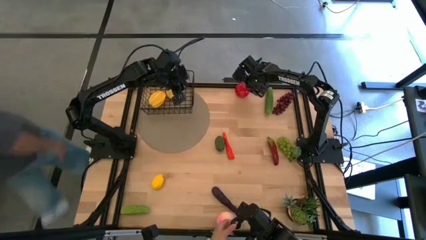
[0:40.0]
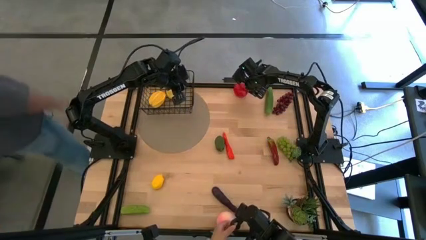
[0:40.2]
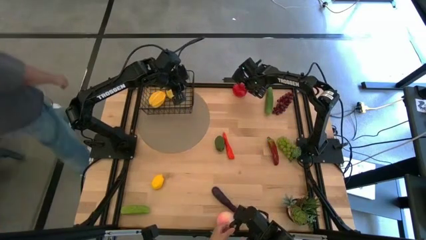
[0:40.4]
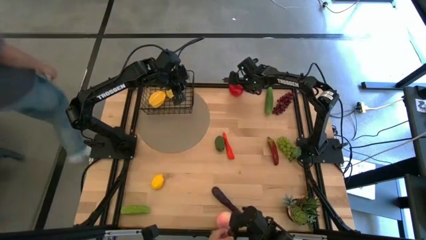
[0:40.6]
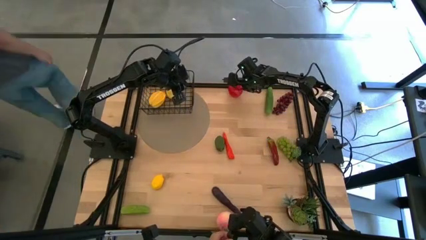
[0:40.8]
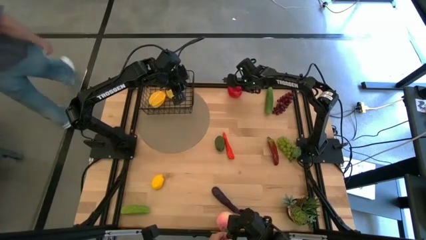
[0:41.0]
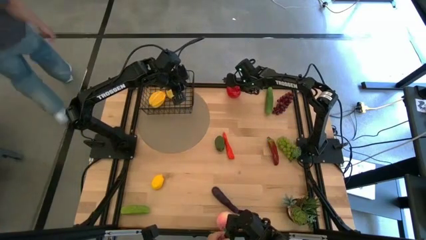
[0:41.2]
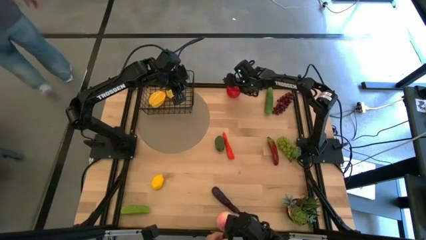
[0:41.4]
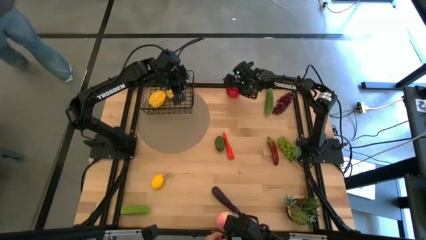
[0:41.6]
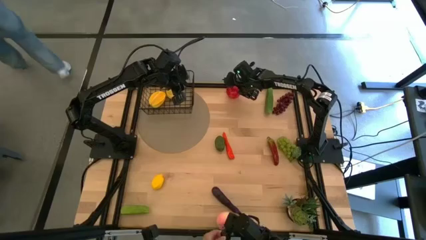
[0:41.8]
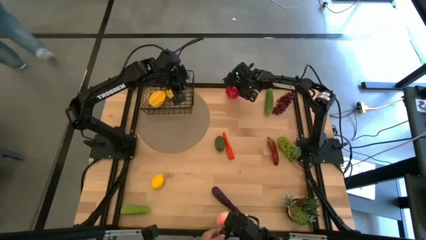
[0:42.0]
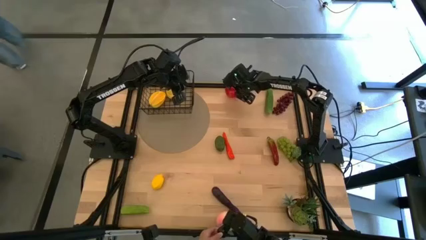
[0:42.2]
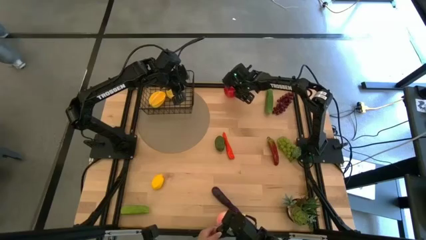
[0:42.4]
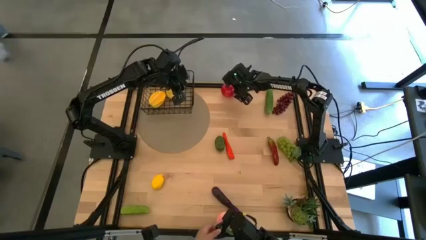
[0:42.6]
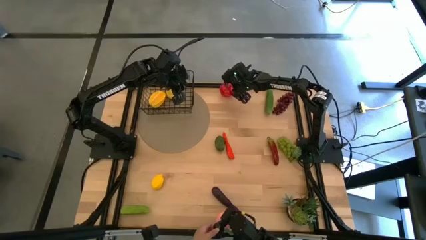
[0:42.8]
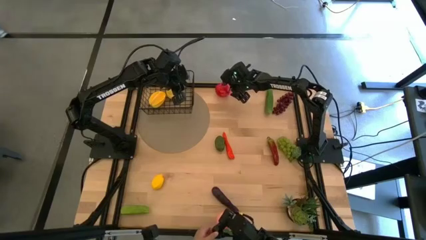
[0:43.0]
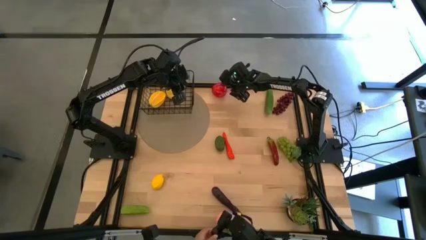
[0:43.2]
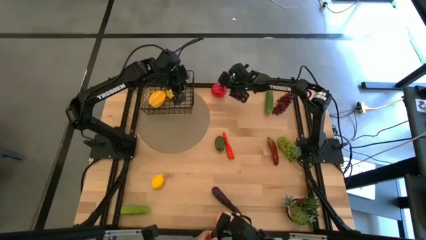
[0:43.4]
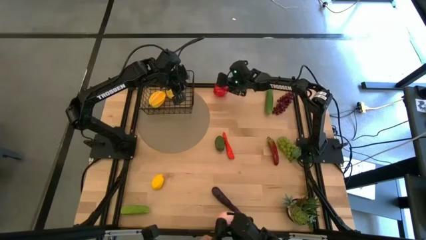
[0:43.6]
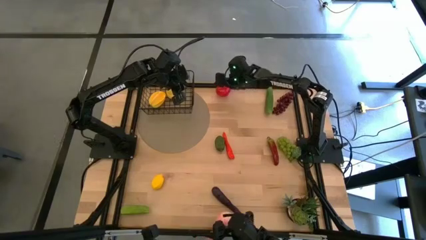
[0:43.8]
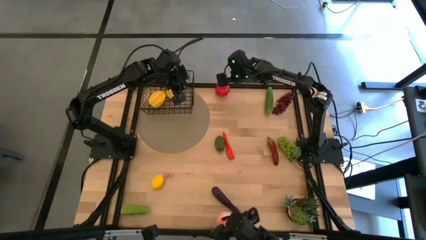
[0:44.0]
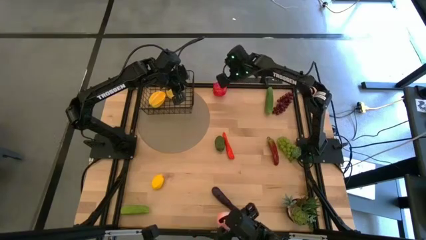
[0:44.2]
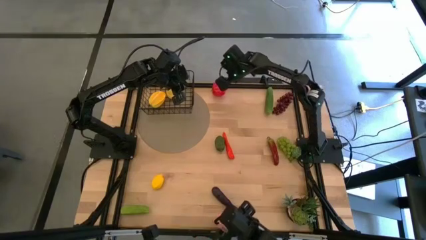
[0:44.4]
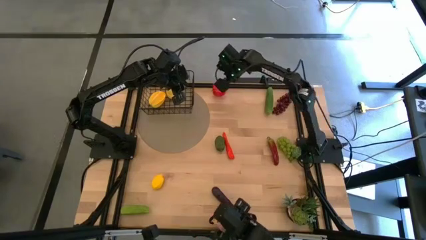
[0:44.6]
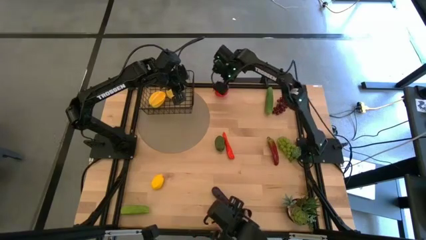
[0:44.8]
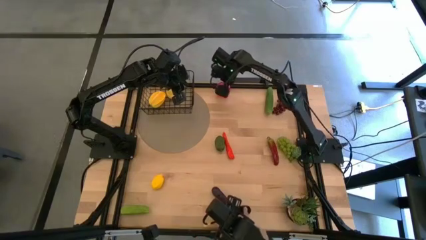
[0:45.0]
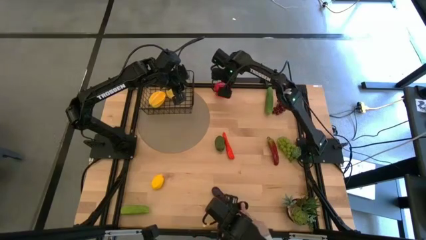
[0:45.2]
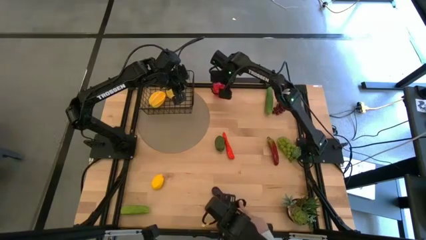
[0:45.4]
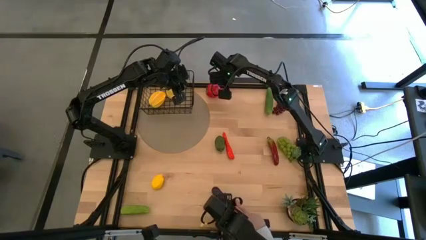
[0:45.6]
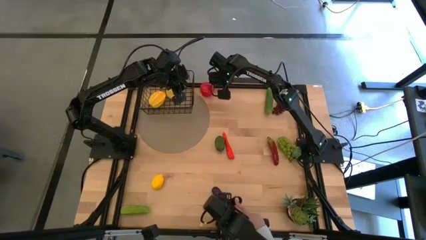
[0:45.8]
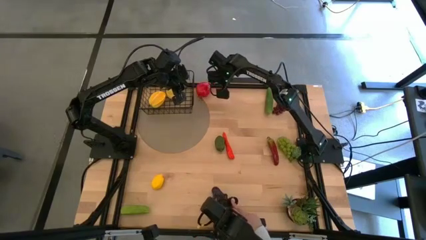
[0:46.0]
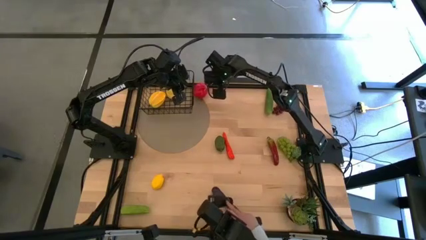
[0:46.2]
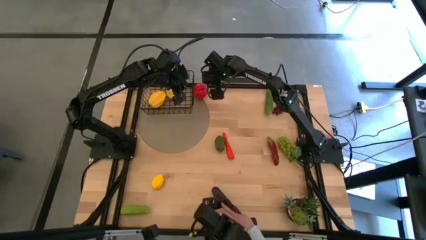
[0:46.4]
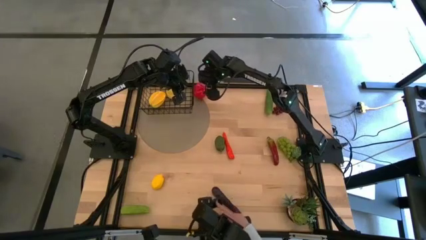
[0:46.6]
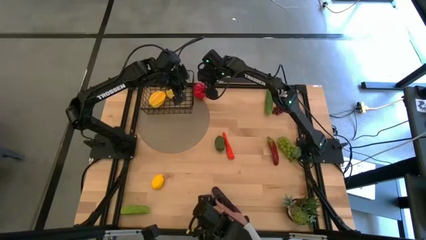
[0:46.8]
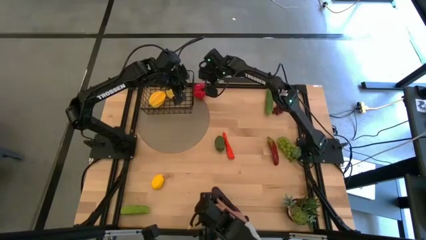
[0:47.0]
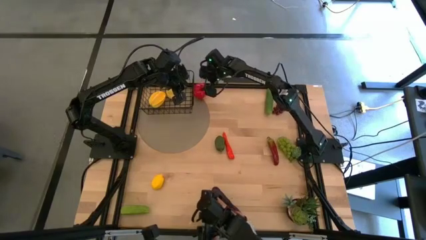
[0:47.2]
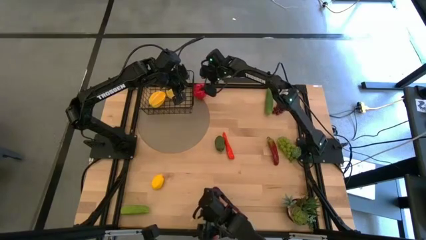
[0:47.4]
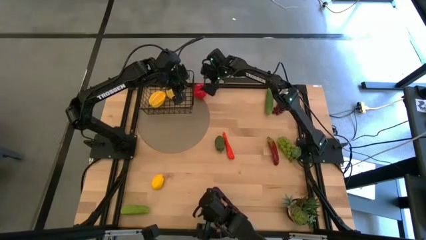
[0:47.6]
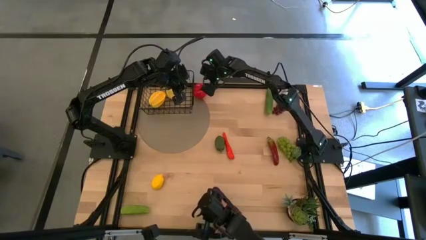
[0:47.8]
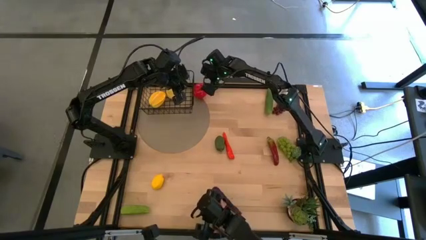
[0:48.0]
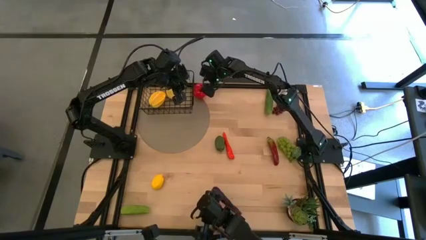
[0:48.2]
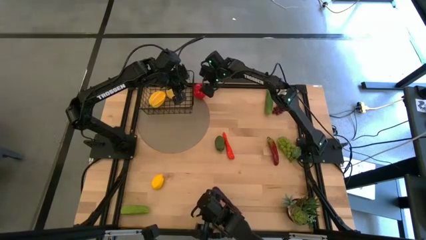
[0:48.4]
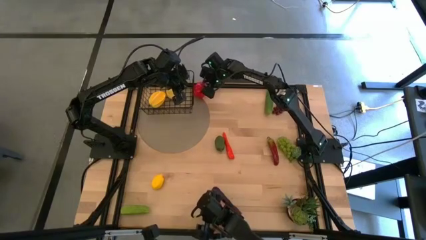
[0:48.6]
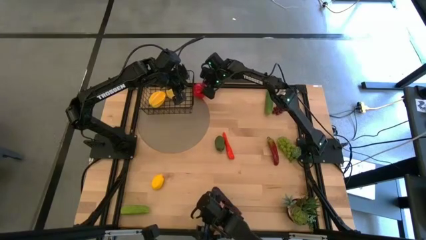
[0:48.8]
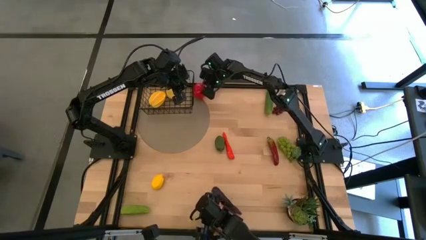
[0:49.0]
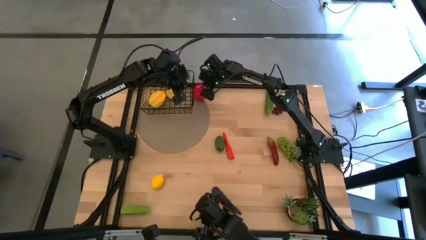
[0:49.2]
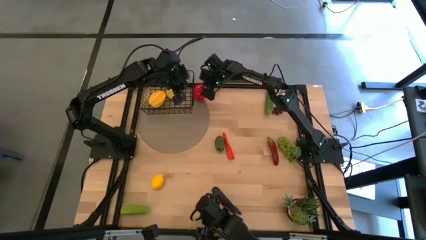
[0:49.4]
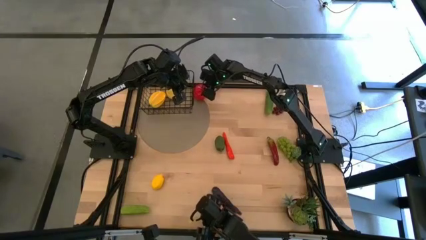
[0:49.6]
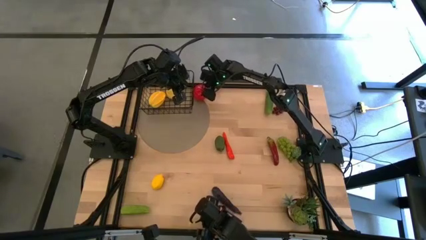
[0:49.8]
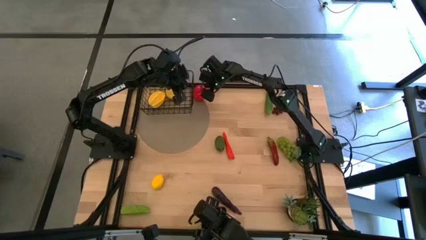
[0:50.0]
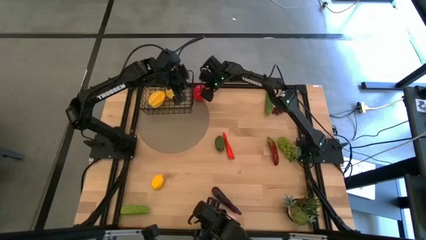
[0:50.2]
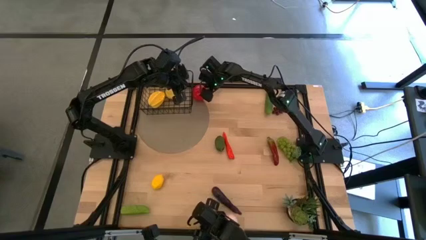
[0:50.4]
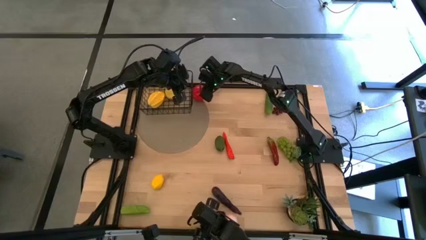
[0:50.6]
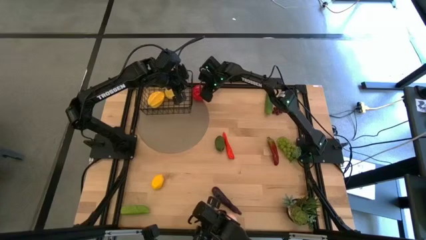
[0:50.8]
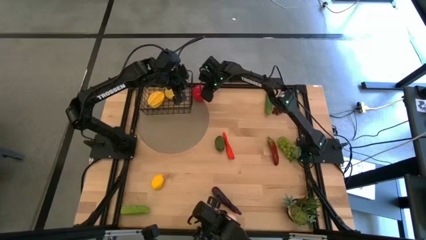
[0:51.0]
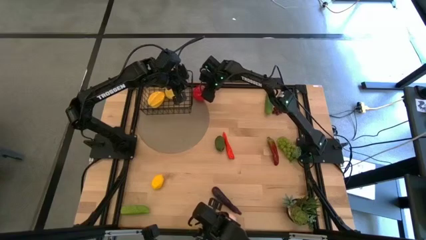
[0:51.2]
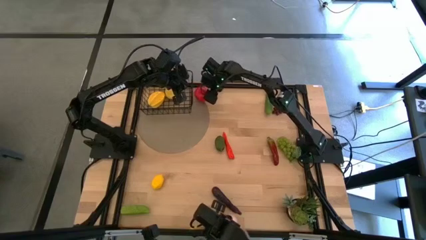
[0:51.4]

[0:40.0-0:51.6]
Task: Build produce basket
Put the red apple into the black wire basket

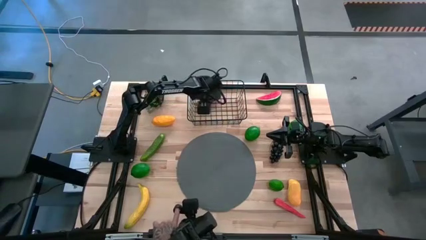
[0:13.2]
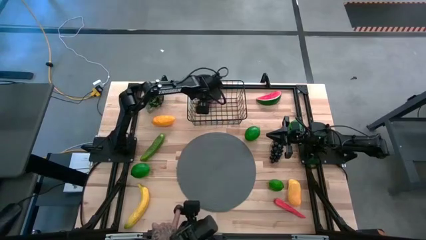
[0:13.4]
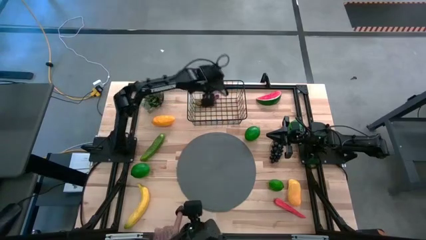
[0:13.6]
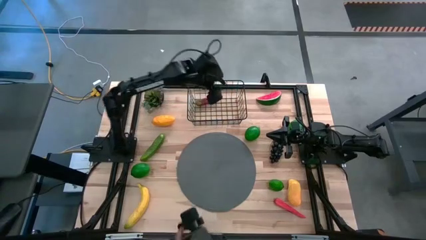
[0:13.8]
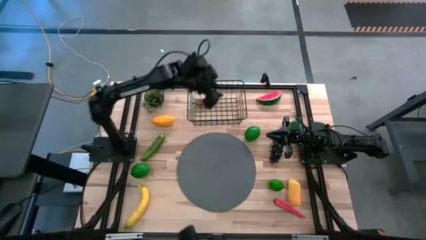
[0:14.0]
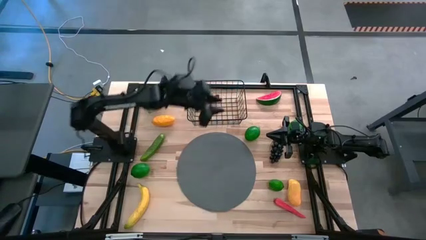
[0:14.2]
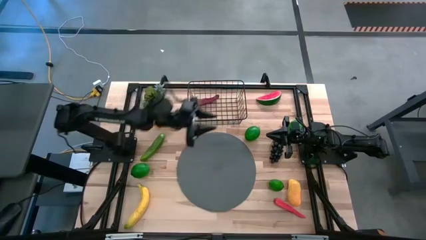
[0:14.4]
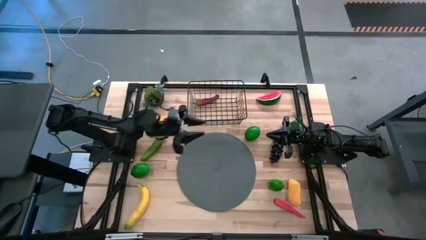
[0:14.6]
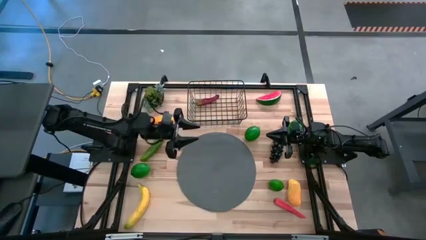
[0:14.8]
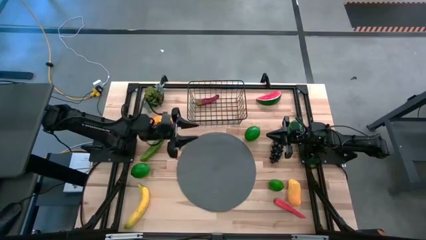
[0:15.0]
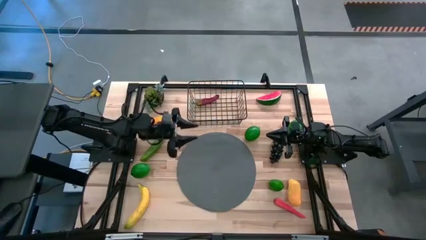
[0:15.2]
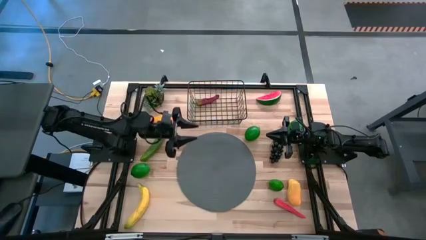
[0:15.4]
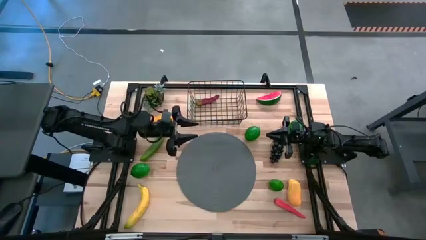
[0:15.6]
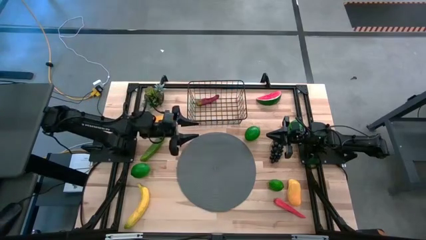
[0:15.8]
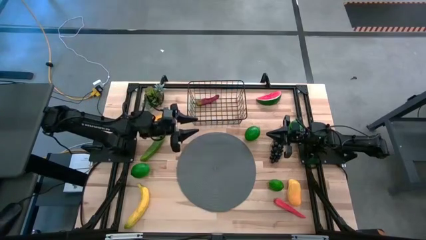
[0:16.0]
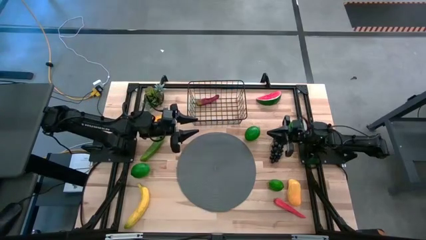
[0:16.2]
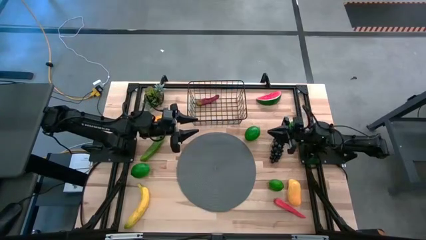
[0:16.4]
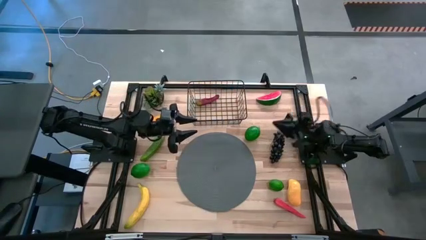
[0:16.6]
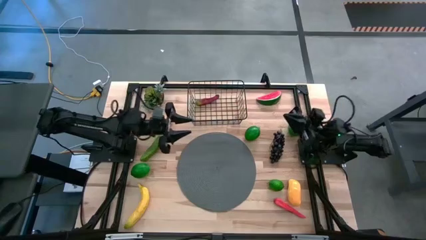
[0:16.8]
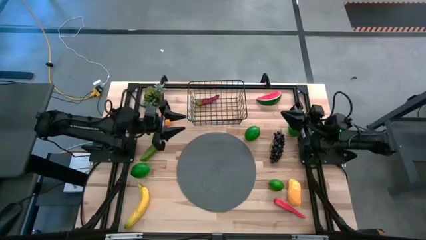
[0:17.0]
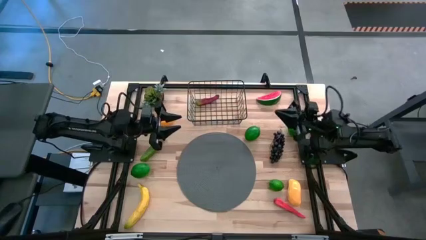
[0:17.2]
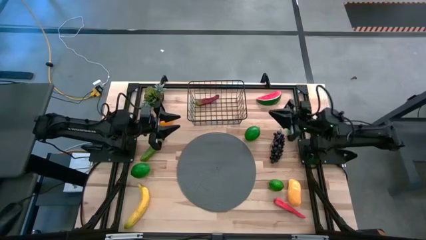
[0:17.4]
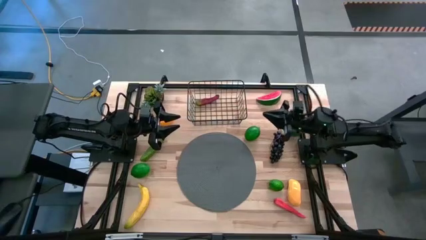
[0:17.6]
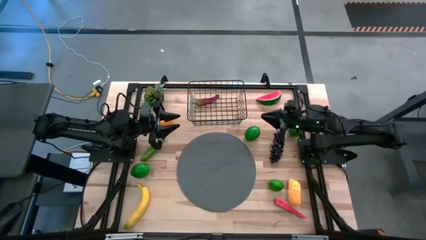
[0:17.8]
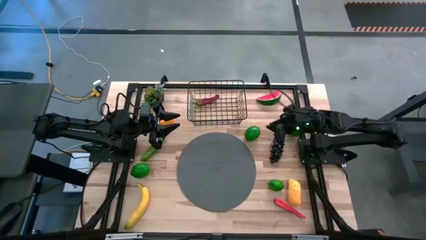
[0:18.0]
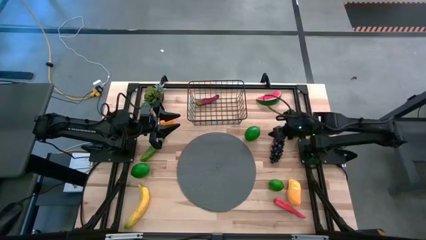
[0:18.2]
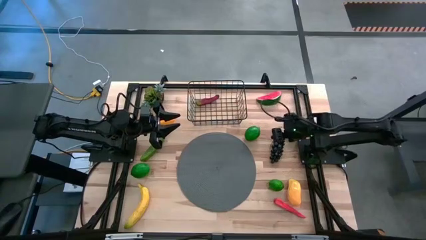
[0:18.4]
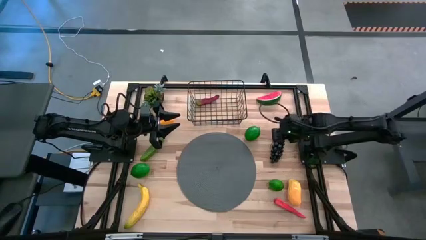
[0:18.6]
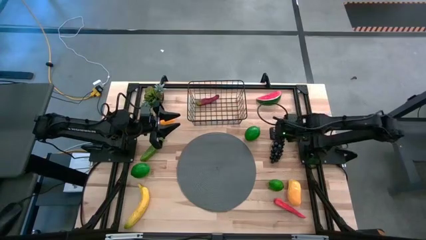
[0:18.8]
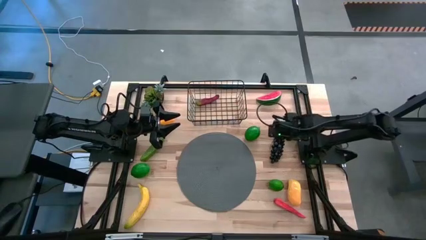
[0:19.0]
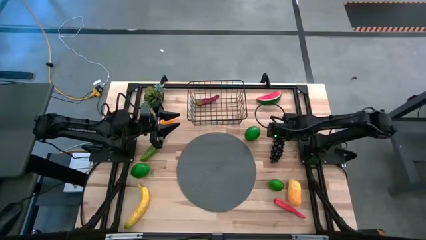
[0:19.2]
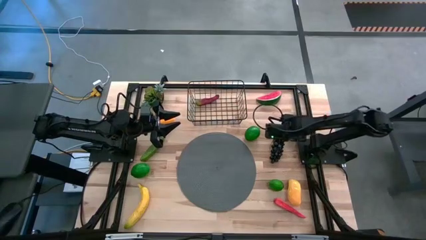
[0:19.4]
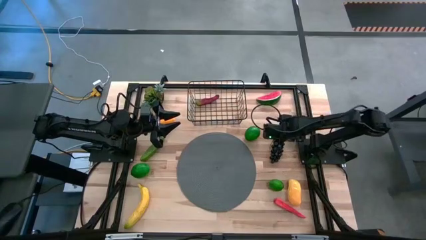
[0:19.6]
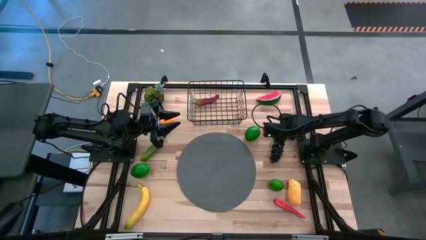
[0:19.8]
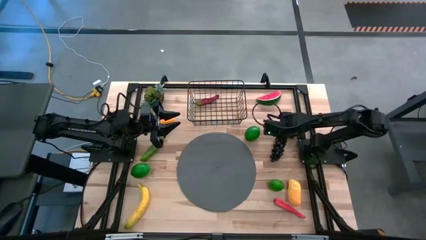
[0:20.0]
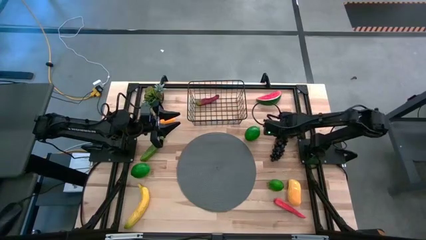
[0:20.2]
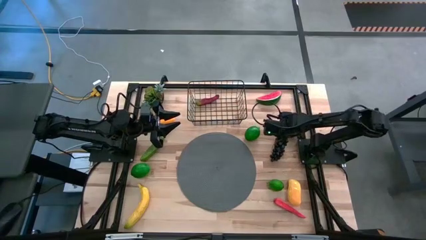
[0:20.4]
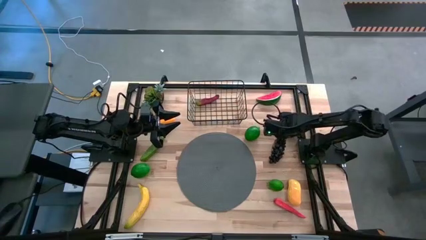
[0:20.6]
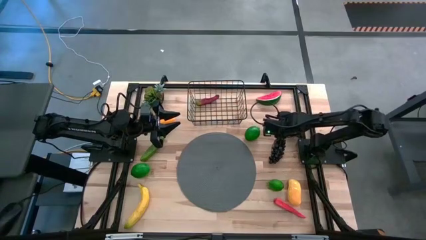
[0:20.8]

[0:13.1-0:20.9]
Task: Build produce basket
Put the black grapes into the black wire basket
